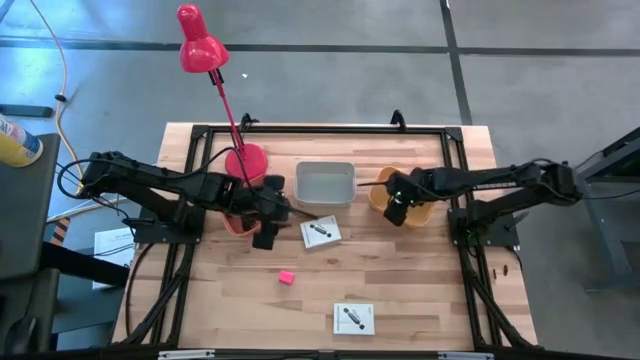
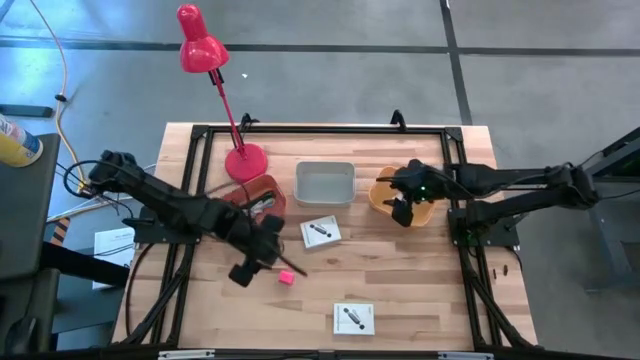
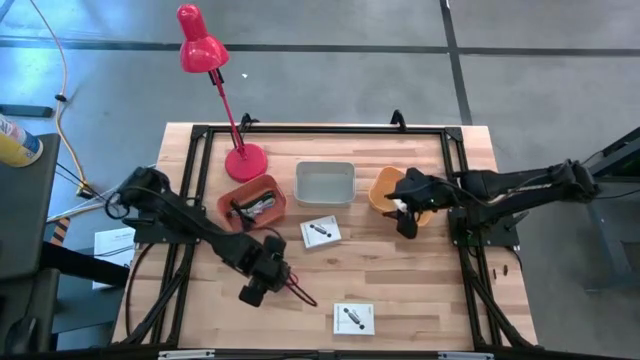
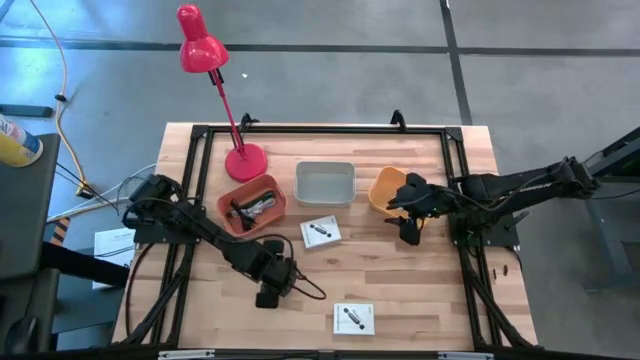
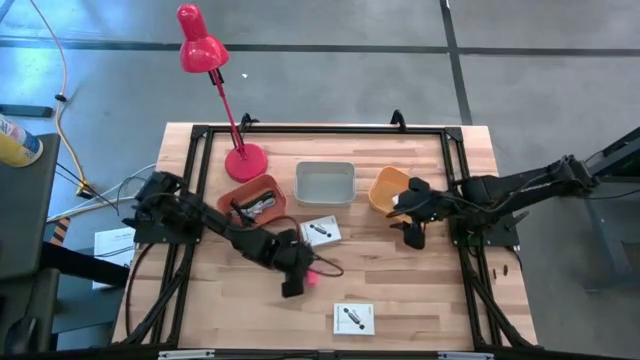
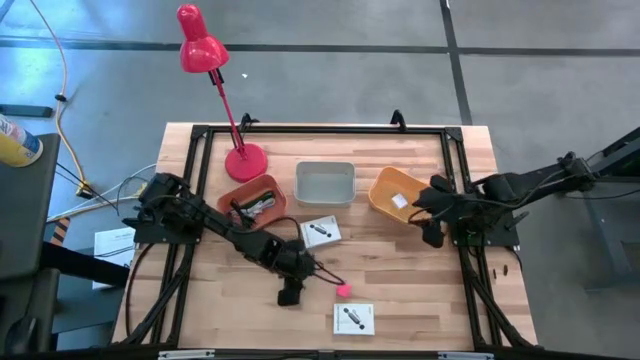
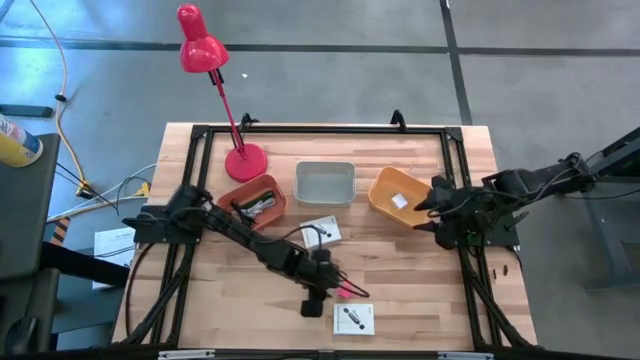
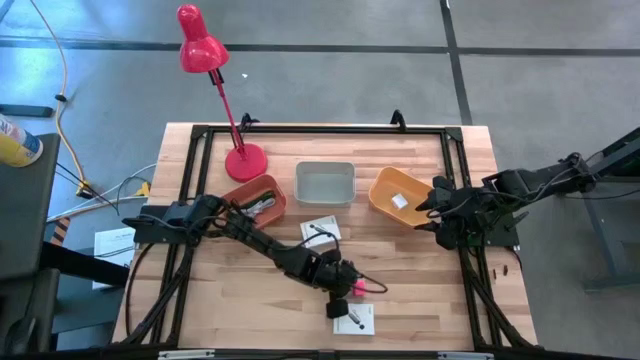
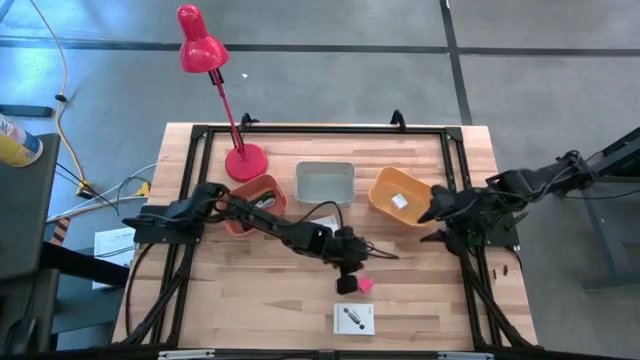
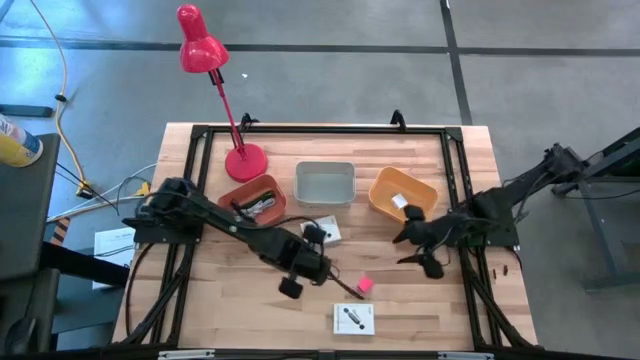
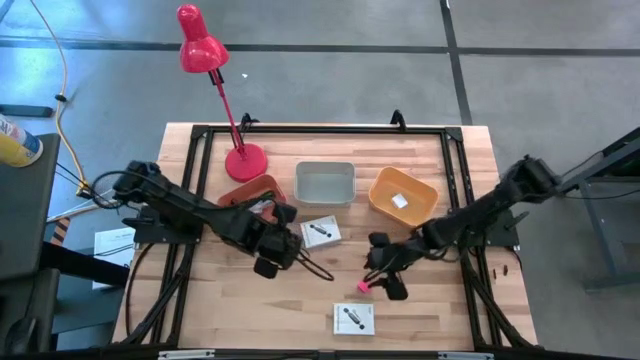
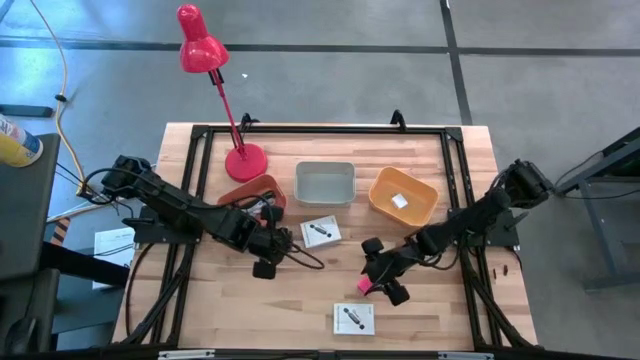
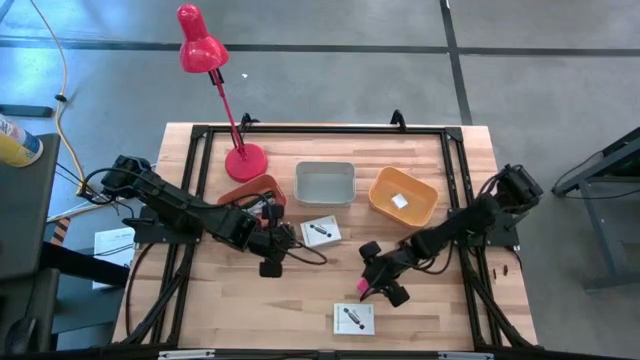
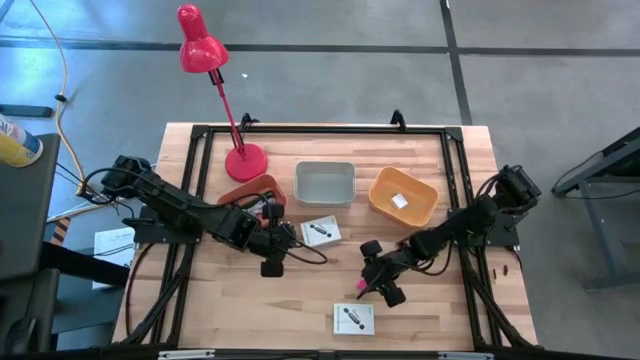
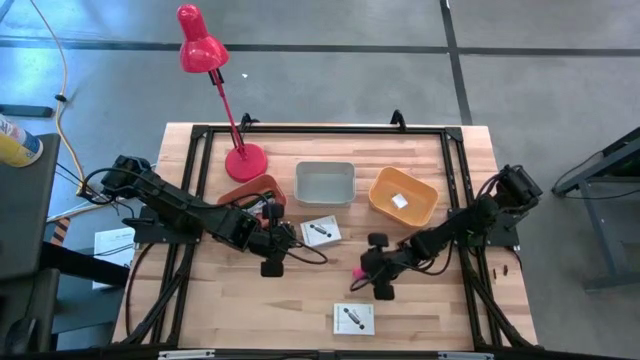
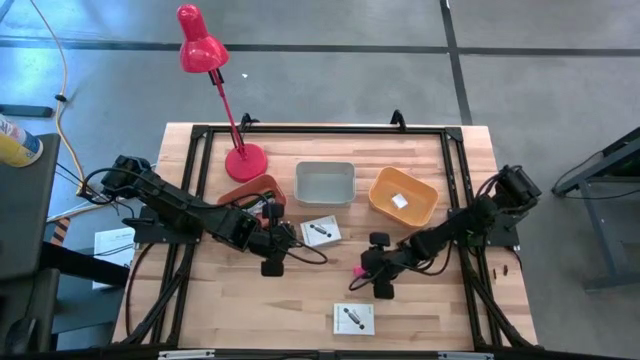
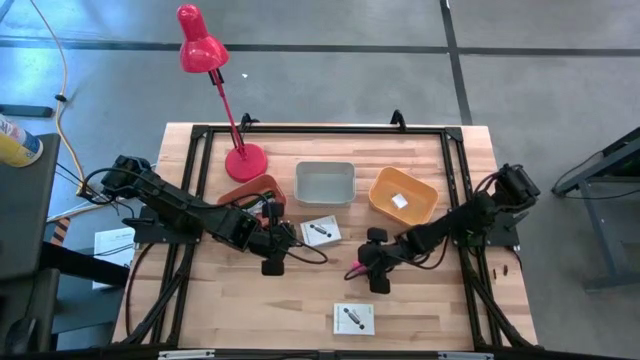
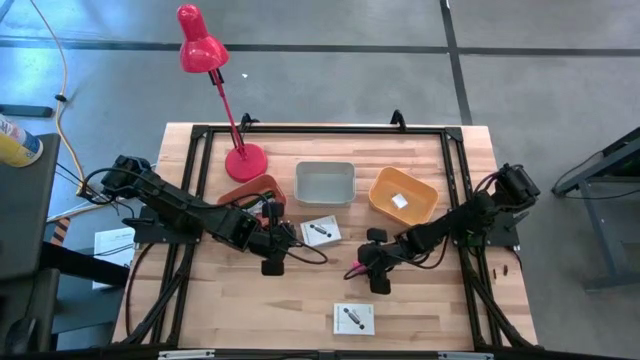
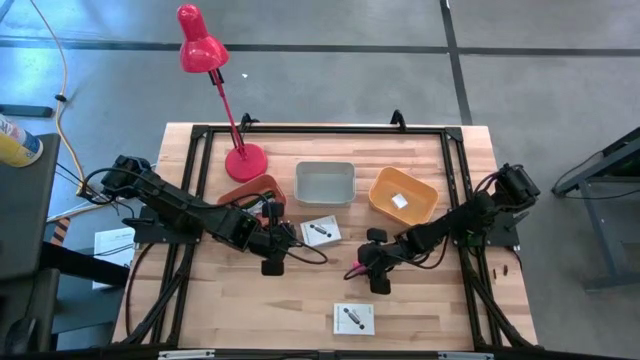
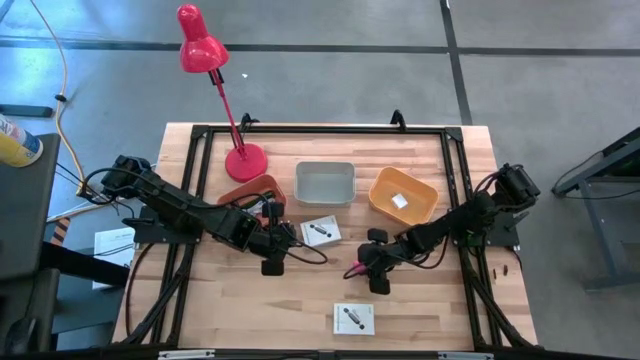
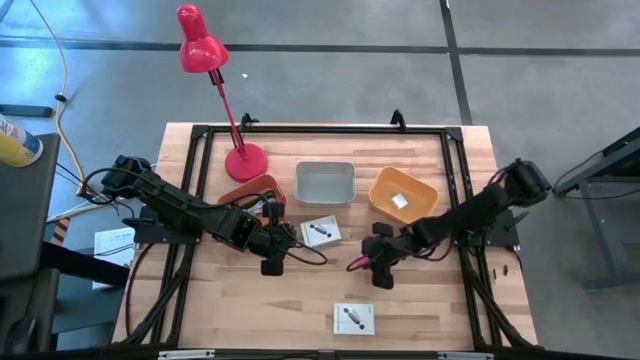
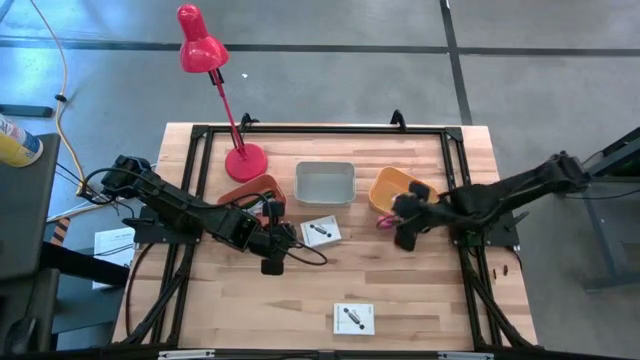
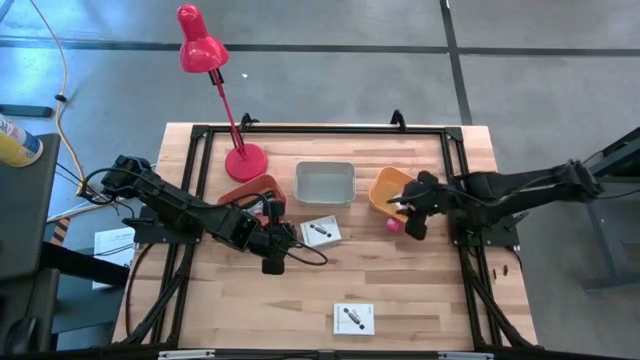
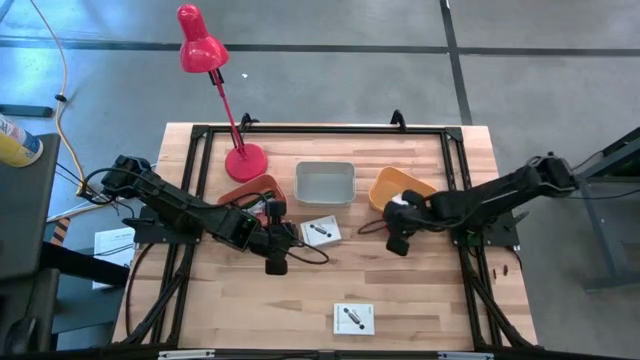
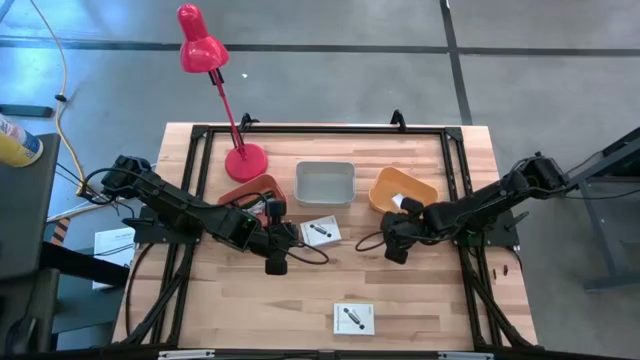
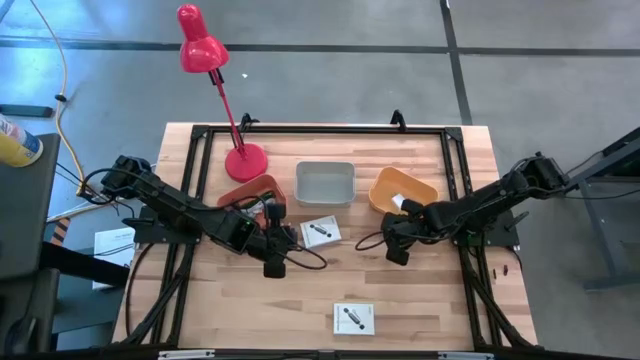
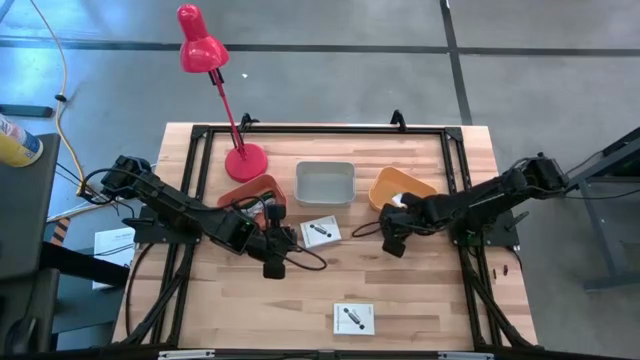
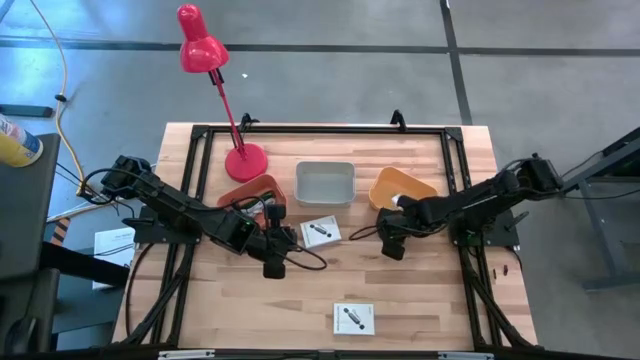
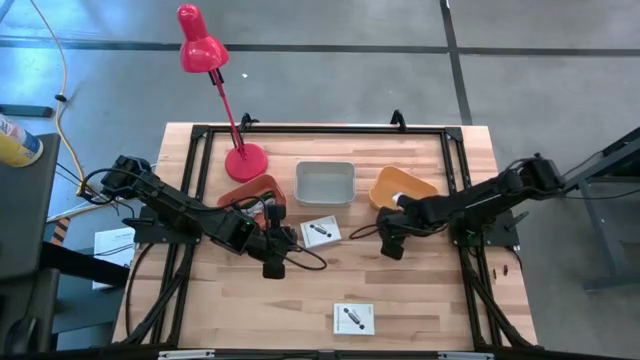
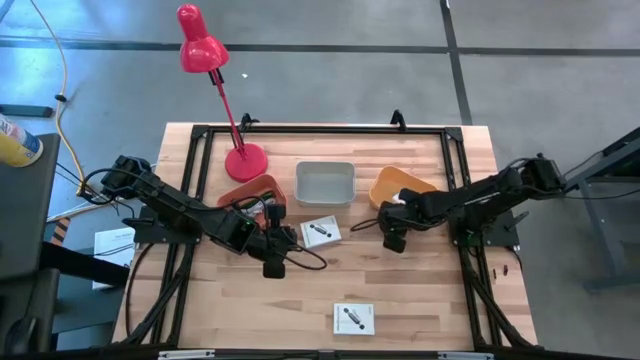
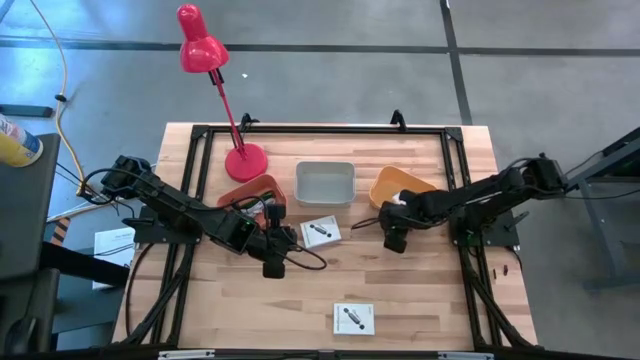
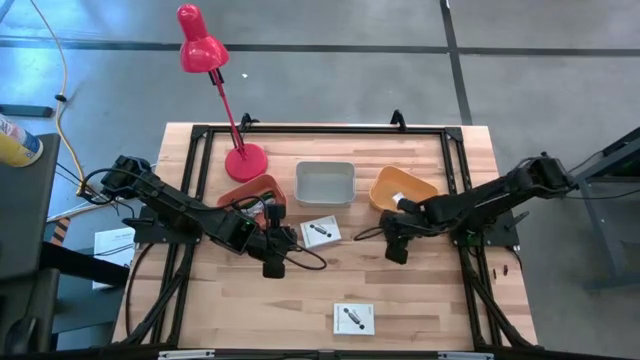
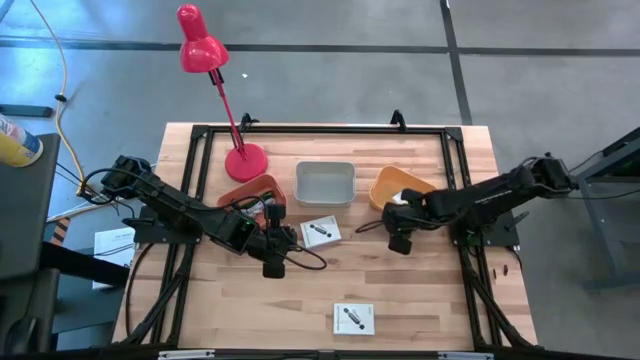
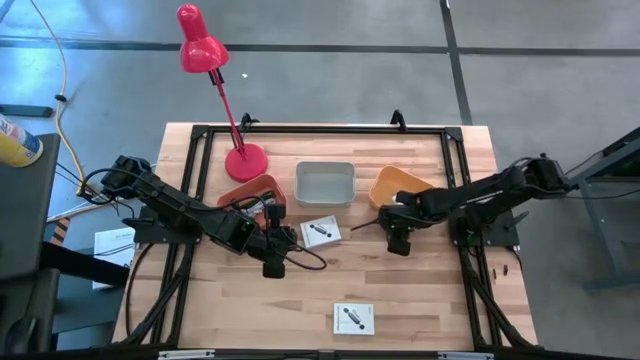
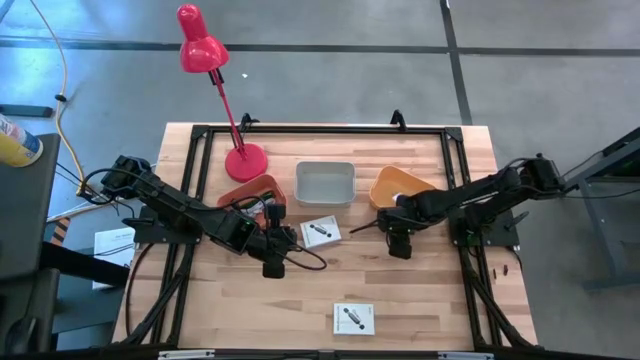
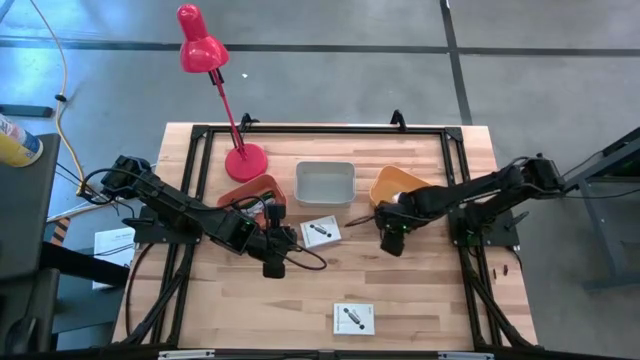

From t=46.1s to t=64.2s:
Task: Pick and place items into bin
Put the pink charger adapter into the orange bin
